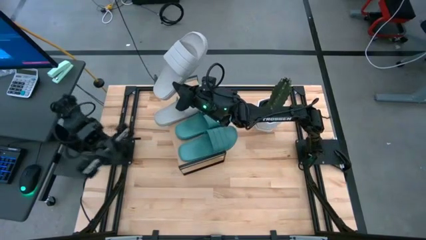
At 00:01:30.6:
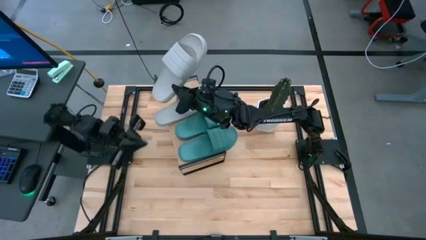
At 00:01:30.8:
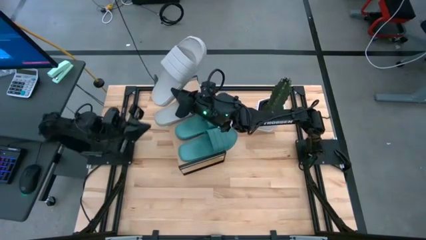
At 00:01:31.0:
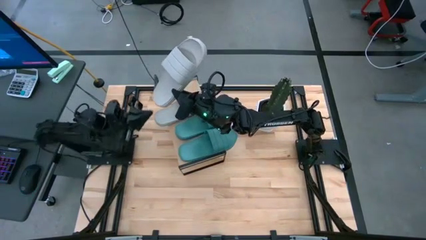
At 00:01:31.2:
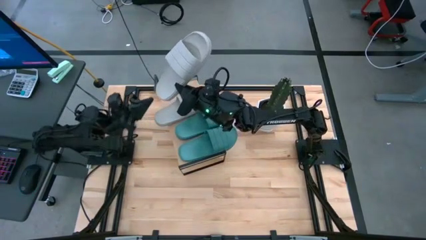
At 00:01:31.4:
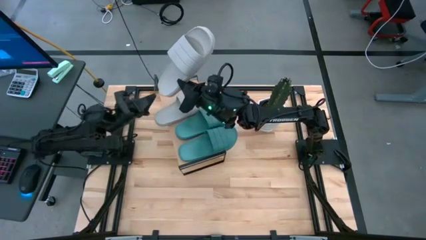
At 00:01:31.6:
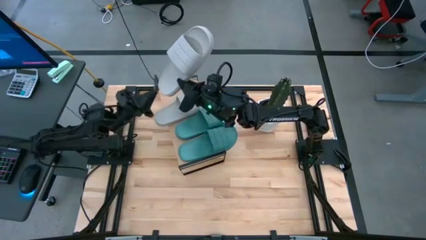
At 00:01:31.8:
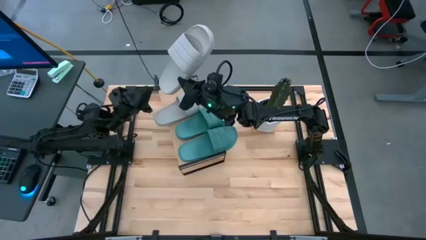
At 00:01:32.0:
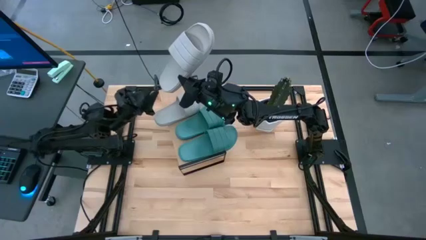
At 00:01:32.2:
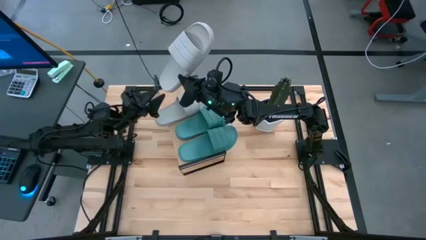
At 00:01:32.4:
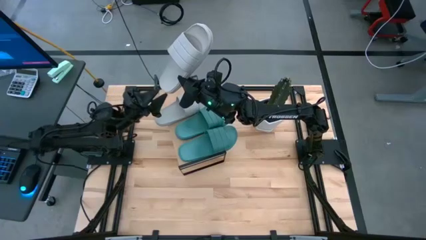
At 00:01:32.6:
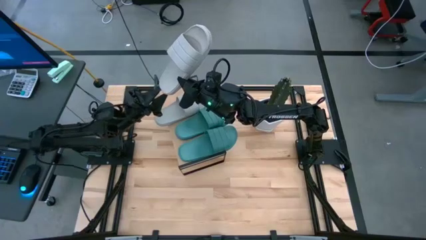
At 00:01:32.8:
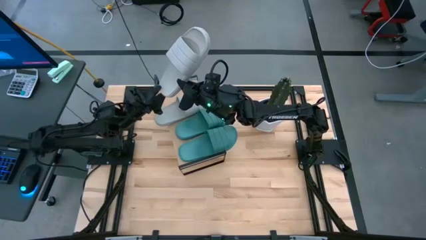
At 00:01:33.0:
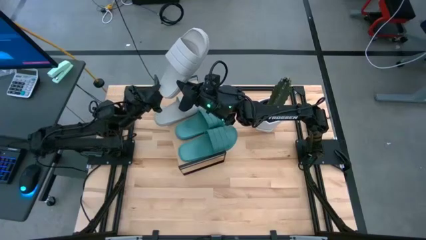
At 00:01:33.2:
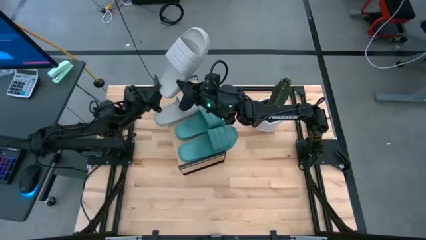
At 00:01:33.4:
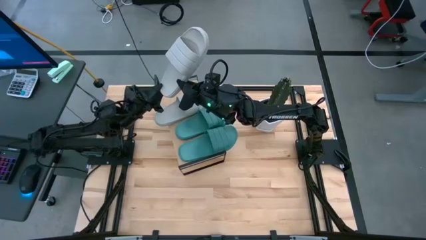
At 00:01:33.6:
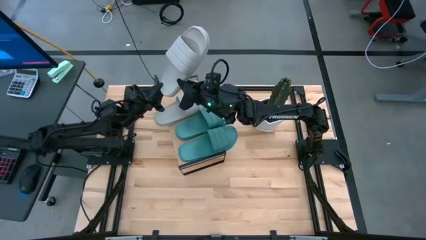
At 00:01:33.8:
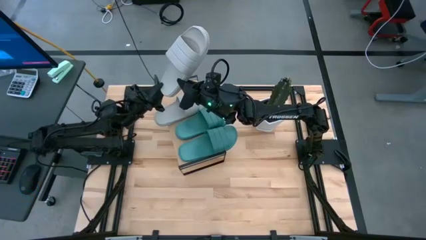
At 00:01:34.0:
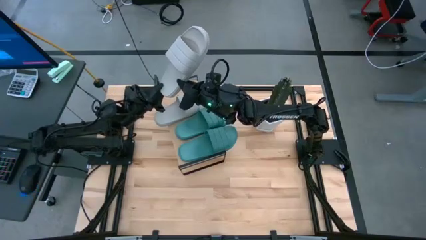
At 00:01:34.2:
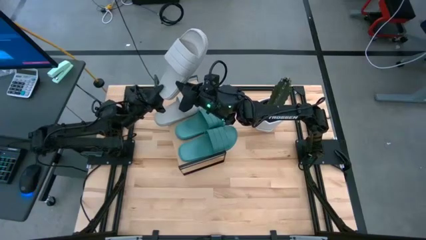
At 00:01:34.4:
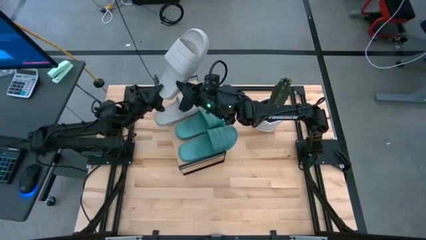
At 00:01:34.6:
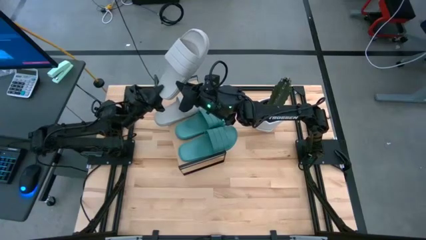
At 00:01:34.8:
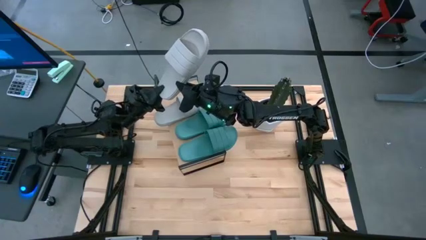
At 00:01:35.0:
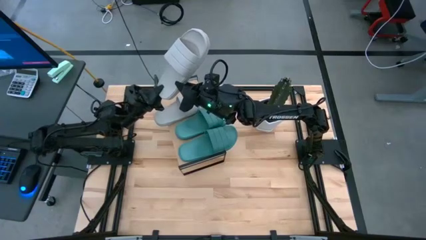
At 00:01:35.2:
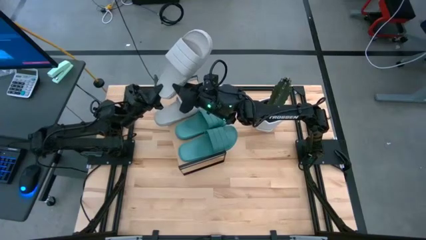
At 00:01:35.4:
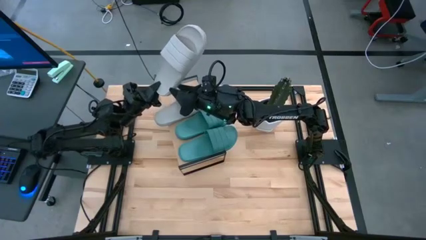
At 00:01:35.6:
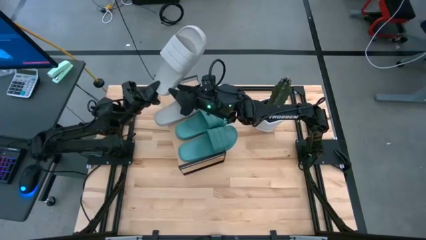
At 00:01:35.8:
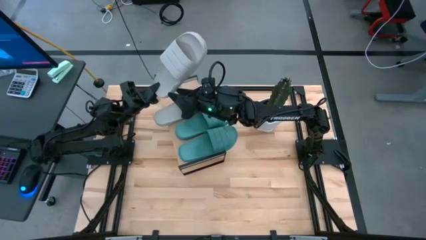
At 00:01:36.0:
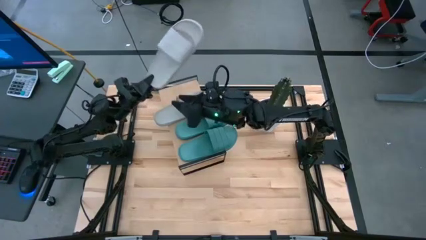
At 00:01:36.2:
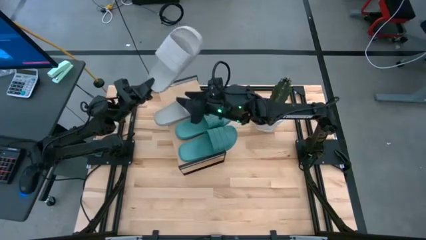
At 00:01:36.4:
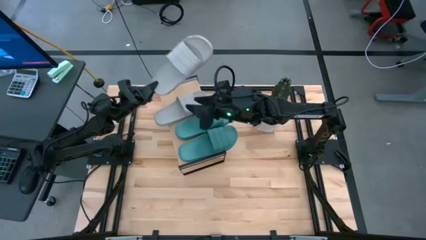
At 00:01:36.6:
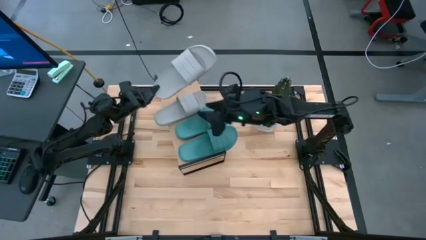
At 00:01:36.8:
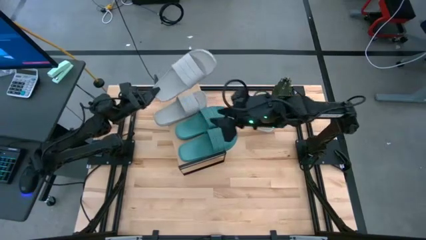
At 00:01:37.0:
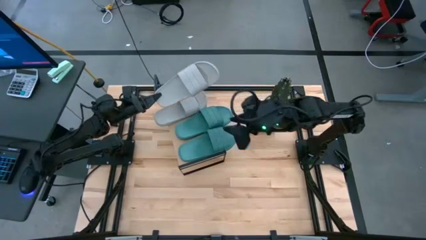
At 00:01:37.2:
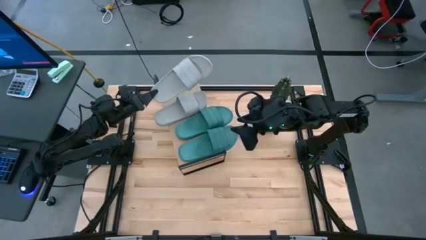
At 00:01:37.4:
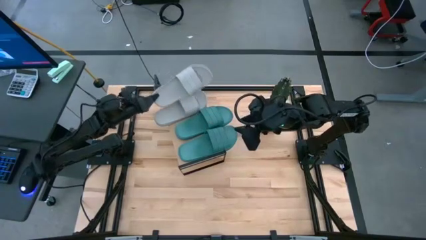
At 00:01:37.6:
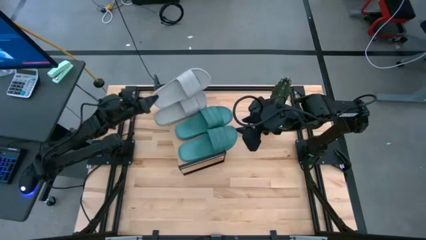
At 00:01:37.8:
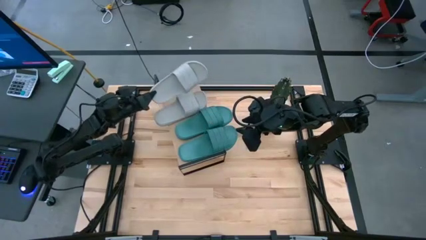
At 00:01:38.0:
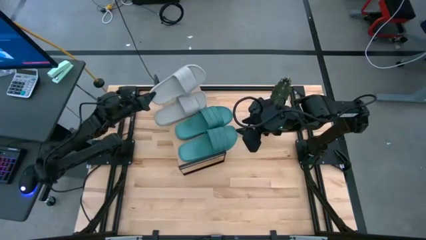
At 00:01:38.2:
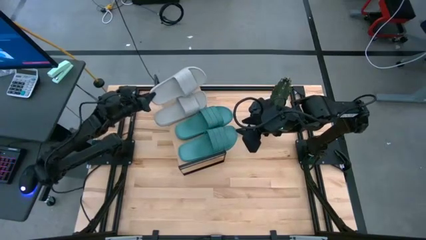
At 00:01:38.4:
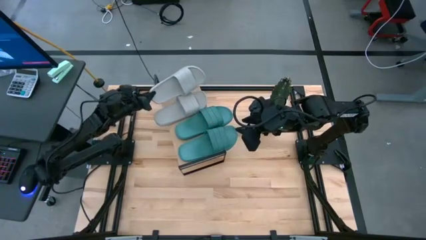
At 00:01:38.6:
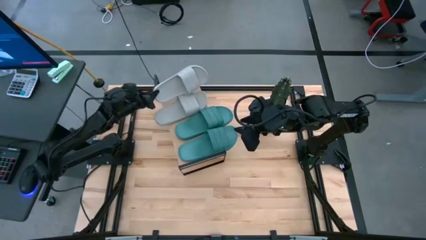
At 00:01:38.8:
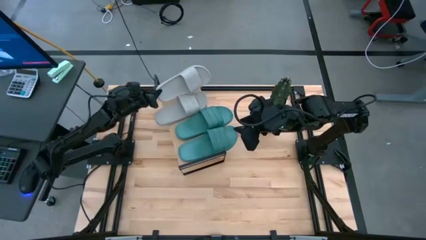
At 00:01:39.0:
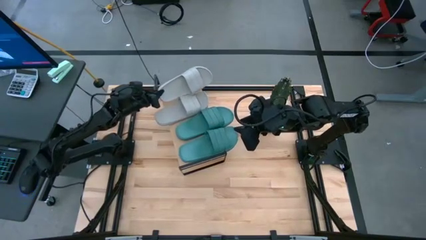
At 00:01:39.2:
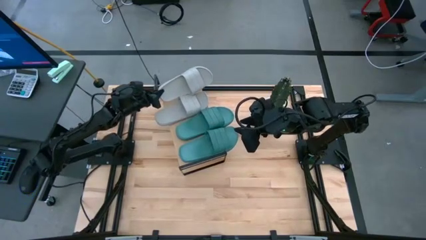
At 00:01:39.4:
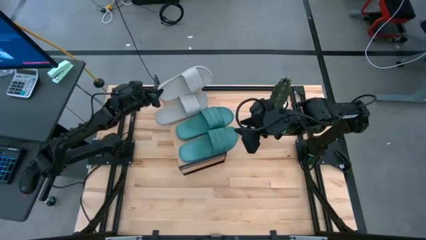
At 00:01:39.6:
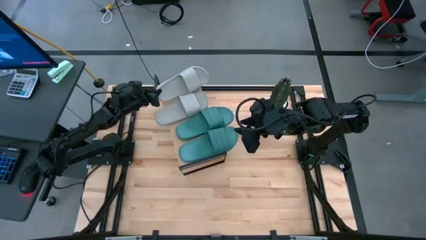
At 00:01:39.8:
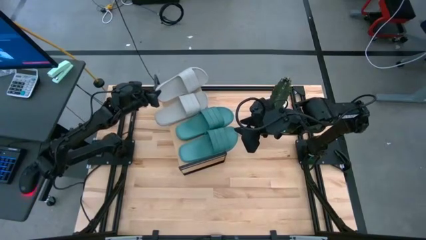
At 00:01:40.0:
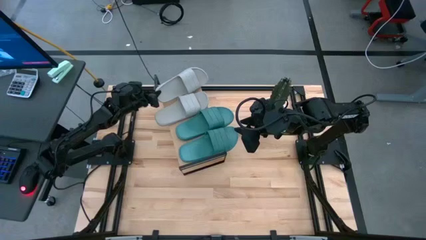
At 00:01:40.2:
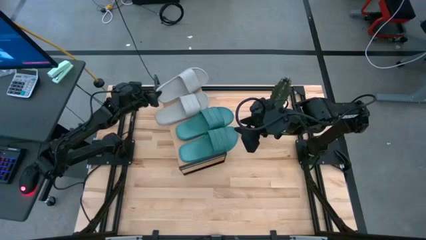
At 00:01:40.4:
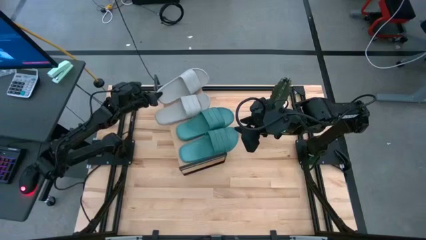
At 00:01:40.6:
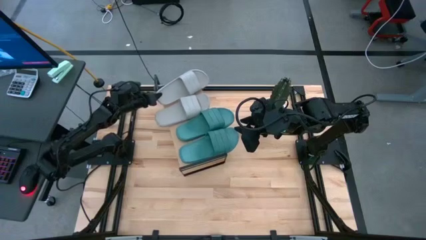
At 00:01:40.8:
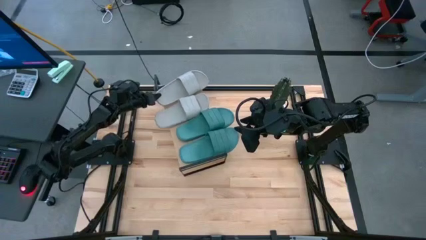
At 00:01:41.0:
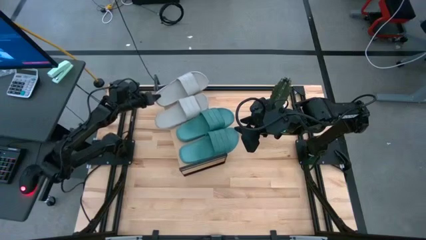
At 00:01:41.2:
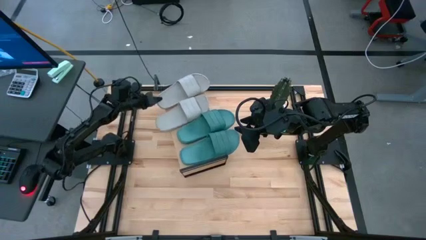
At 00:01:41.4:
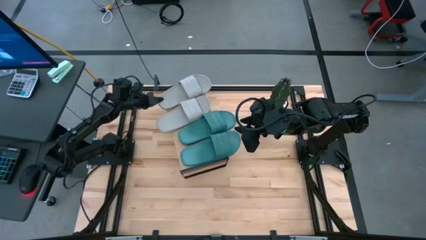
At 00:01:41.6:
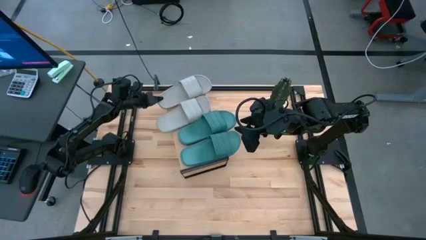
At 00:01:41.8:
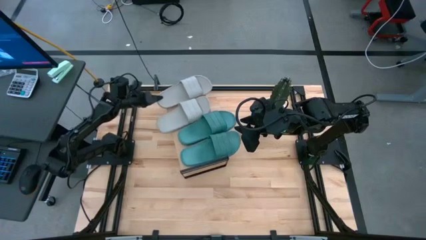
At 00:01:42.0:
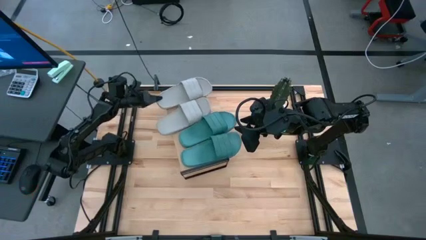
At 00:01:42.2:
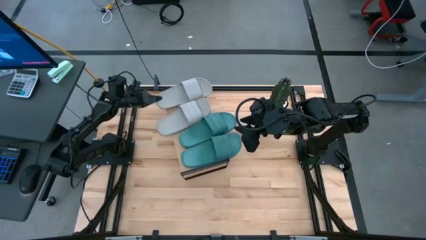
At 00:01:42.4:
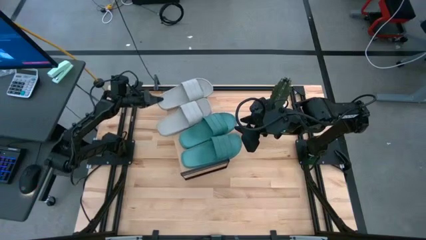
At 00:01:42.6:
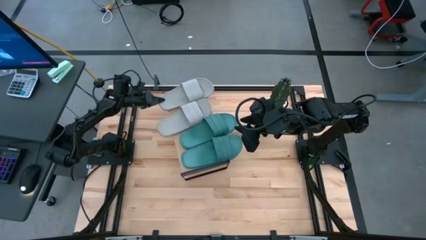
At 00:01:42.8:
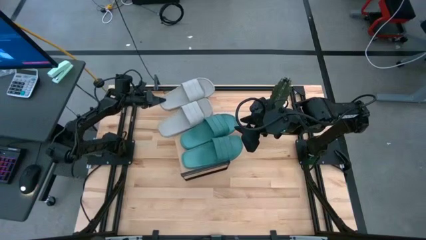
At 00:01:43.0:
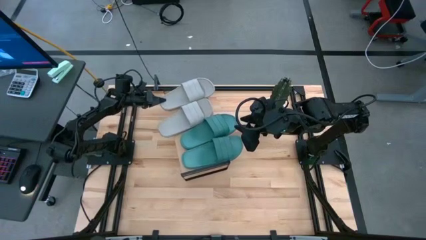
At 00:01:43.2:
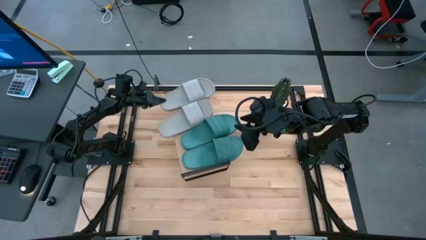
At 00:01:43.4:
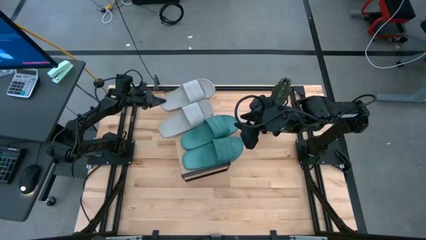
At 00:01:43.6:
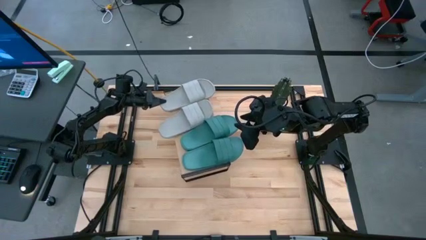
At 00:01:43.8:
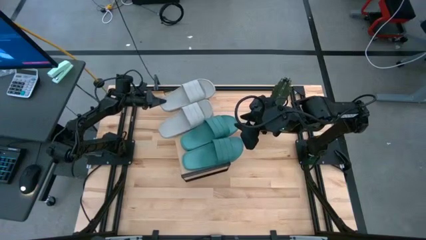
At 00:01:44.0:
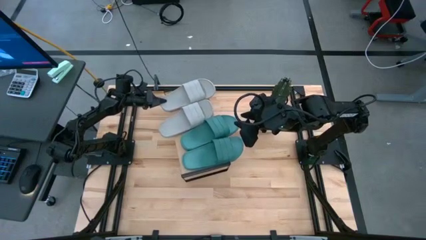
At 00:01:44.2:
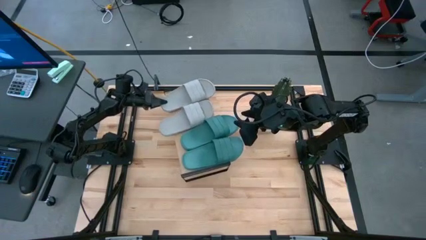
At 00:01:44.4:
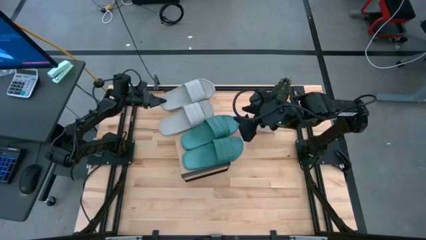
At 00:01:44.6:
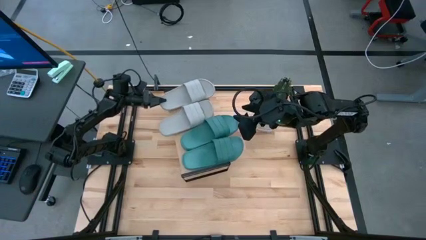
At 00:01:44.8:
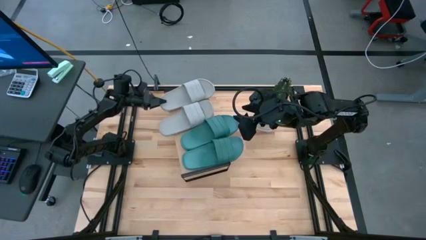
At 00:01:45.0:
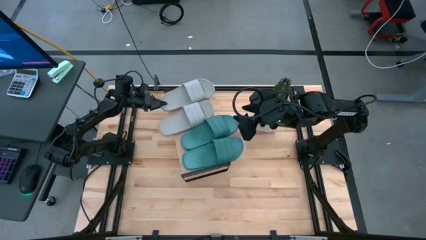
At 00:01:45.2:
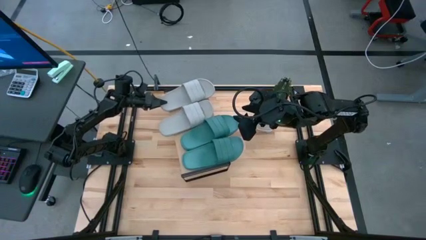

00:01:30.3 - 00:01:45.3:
Task: Pick and place slides into the shelf
Put the white slipper on the shelf

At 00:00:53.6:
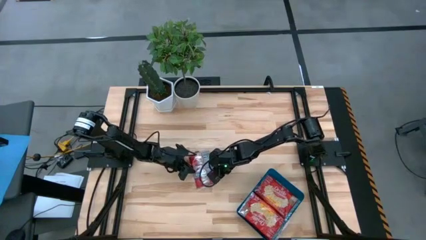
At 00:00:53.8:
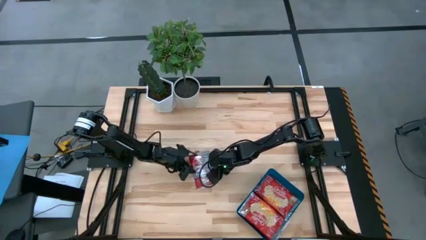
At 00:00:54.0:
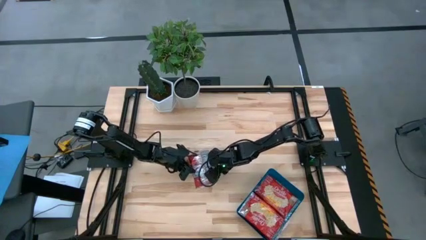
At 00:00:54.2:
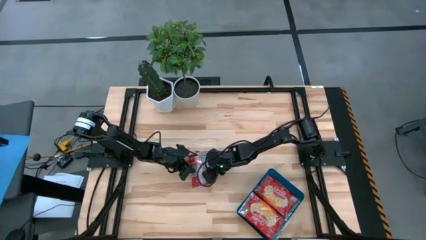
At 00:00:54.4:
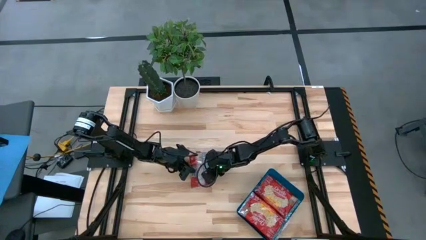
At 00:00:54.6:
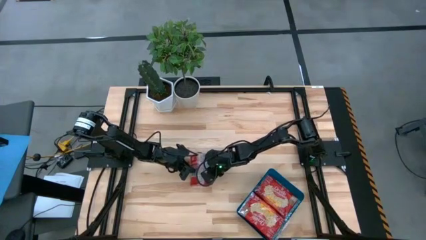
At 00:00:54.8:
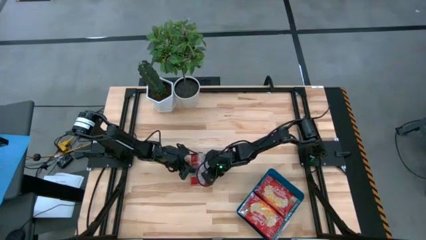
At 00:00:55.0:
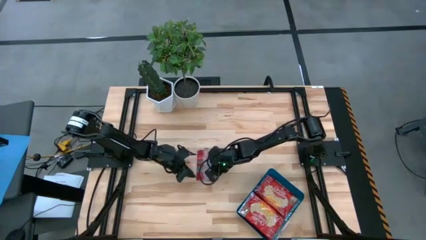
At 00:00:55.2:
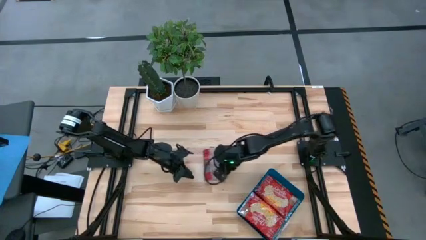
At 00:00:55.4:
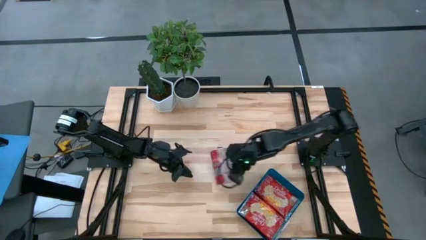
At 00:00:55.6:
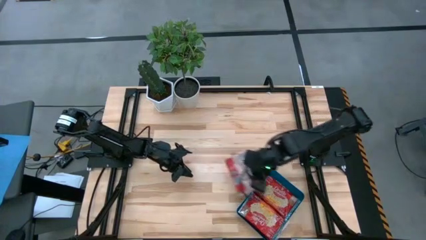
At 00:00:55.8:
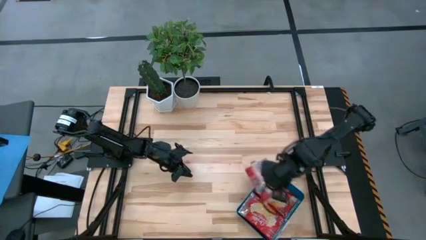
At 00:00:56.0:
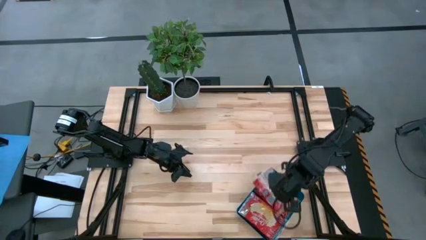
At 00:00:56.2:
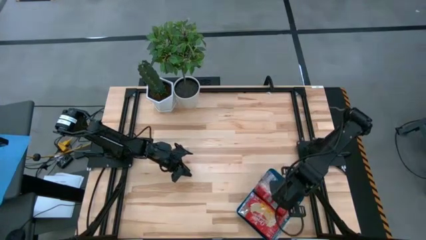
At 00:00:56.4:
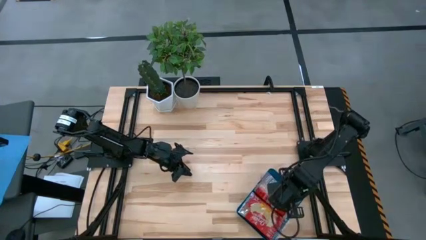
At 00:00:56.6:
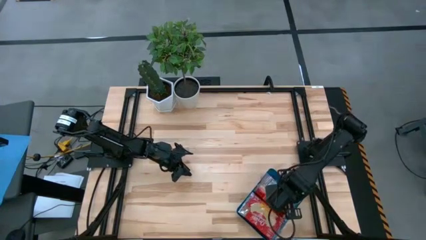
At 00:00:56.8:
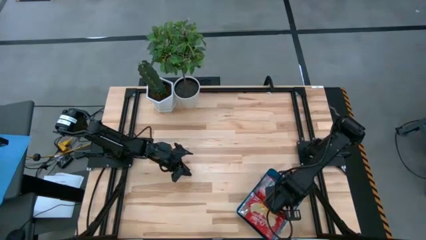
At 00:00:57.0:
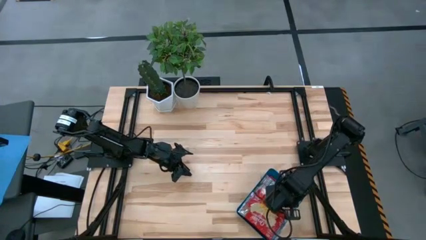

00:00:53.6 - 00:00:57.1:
Task: Sort popcorn bags into baskets
Put the red popcorn bag into the blue bin
